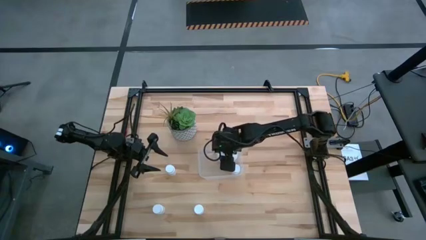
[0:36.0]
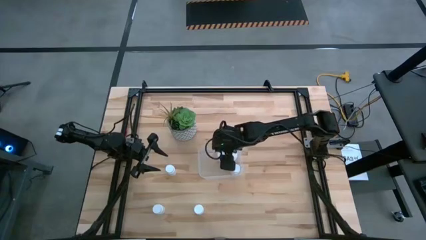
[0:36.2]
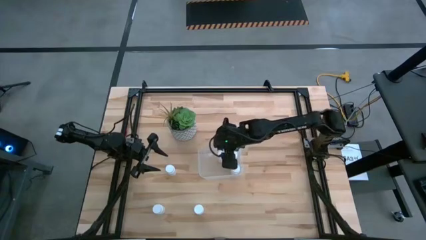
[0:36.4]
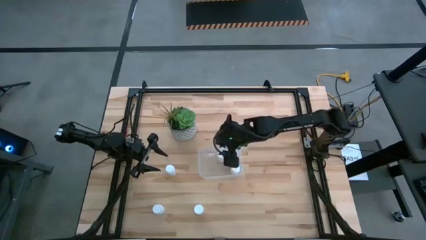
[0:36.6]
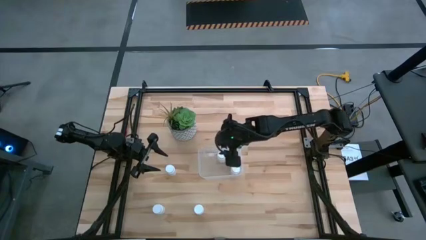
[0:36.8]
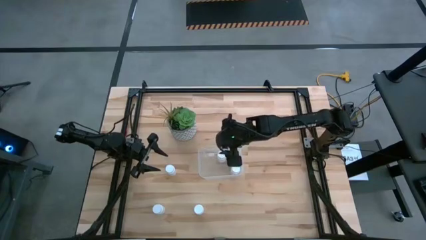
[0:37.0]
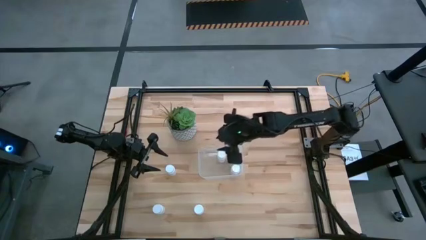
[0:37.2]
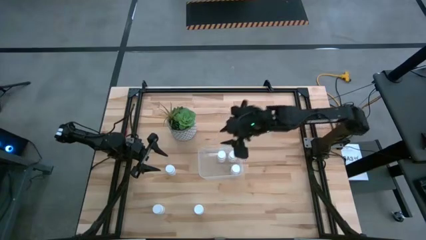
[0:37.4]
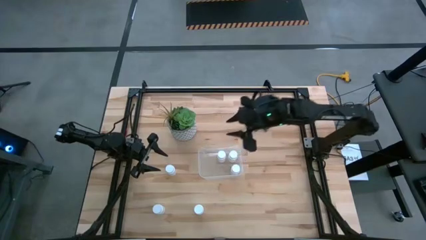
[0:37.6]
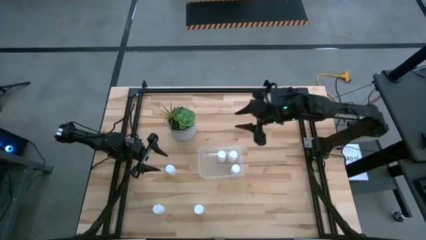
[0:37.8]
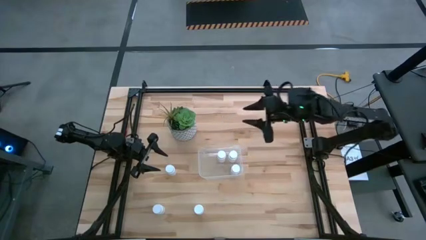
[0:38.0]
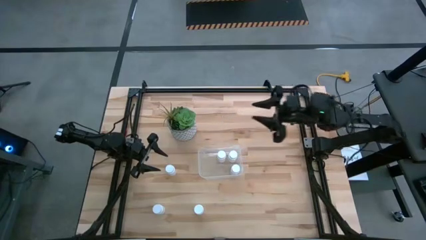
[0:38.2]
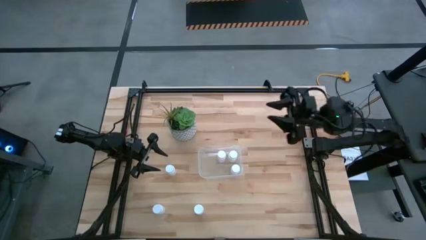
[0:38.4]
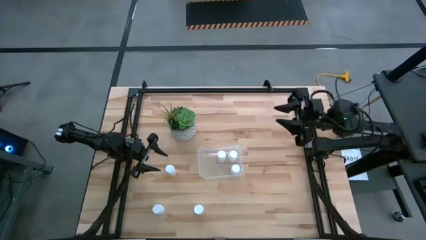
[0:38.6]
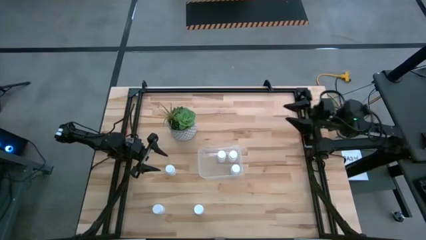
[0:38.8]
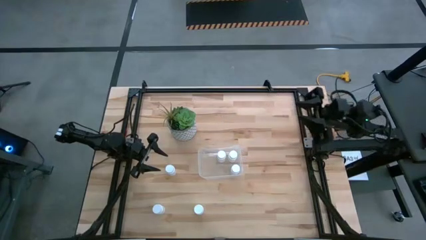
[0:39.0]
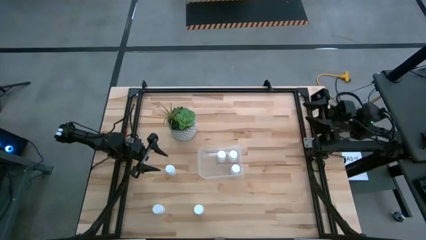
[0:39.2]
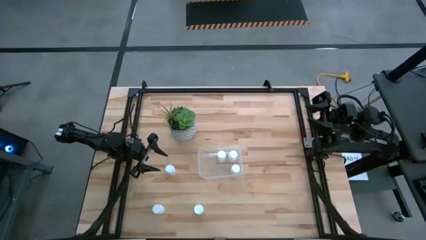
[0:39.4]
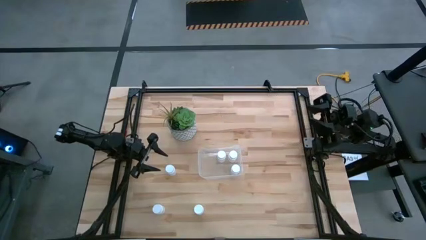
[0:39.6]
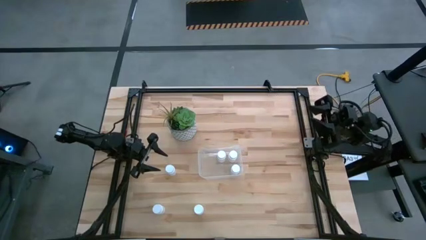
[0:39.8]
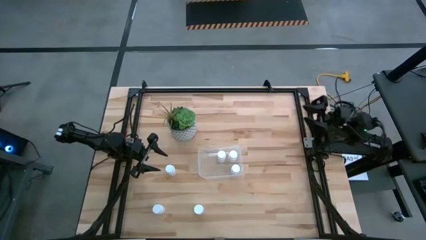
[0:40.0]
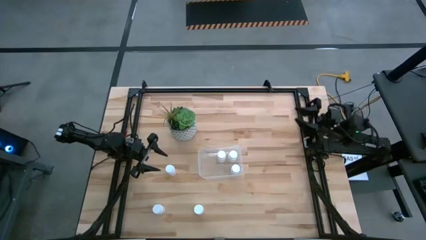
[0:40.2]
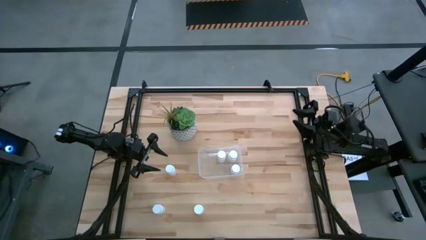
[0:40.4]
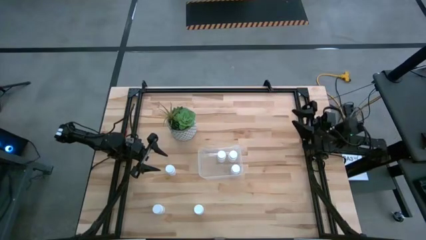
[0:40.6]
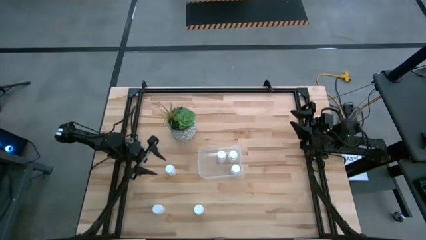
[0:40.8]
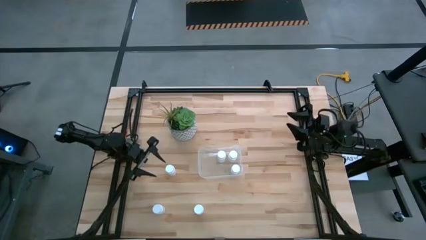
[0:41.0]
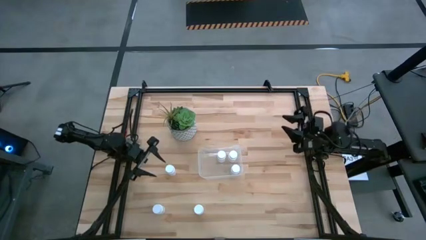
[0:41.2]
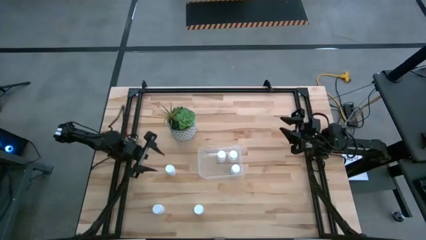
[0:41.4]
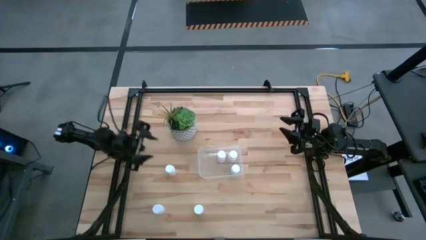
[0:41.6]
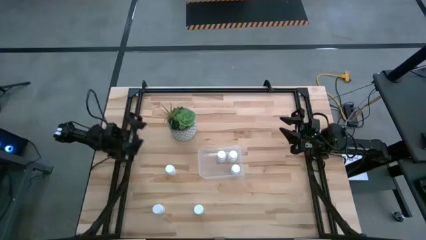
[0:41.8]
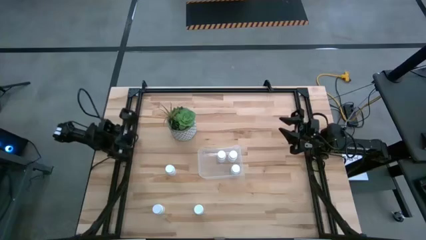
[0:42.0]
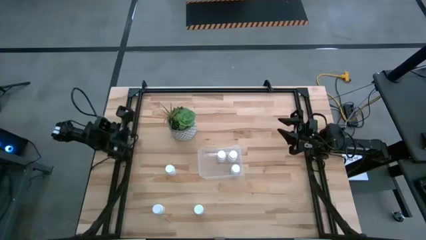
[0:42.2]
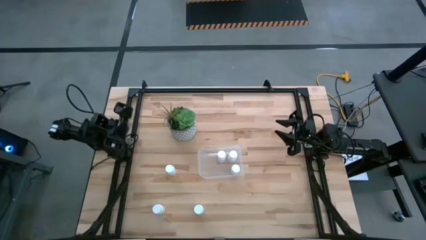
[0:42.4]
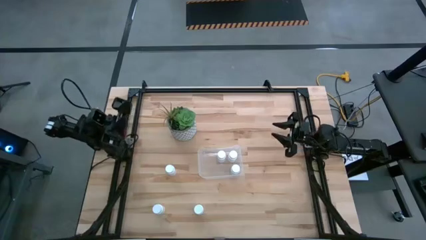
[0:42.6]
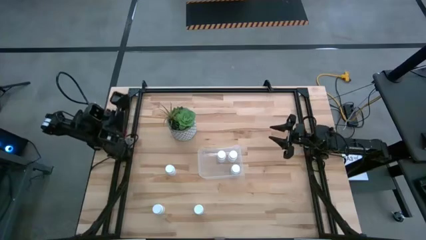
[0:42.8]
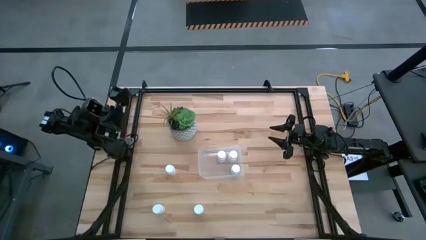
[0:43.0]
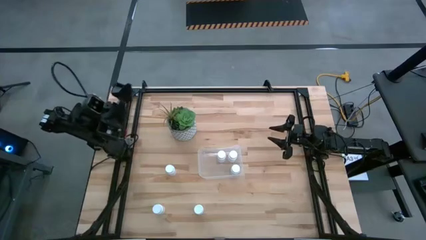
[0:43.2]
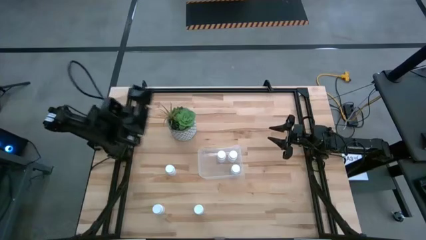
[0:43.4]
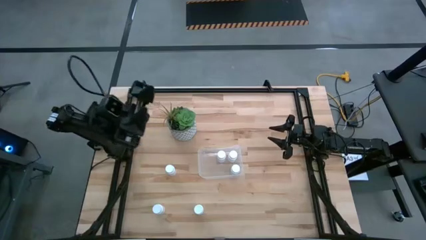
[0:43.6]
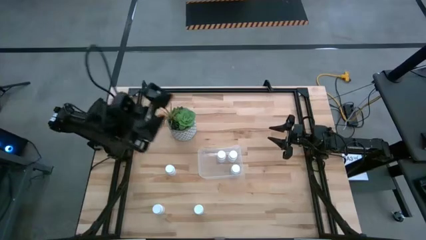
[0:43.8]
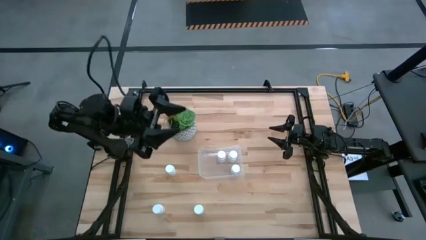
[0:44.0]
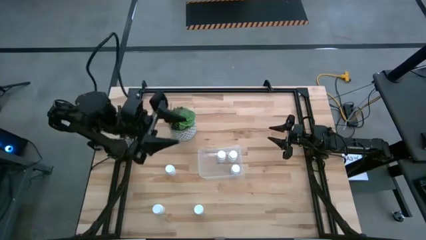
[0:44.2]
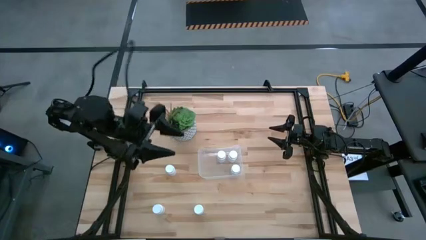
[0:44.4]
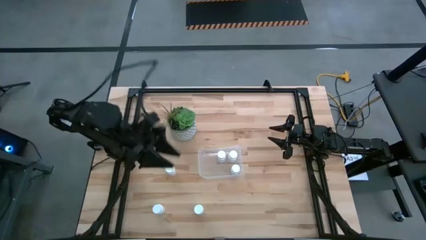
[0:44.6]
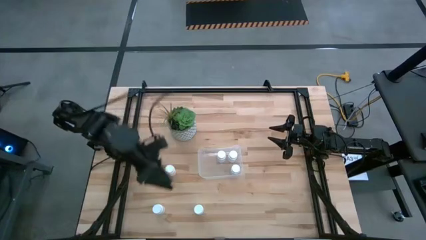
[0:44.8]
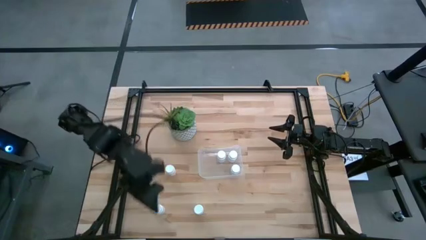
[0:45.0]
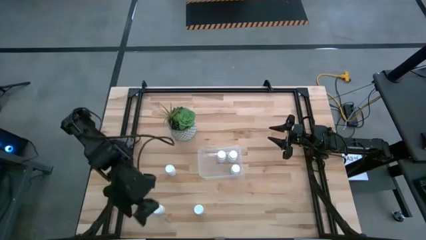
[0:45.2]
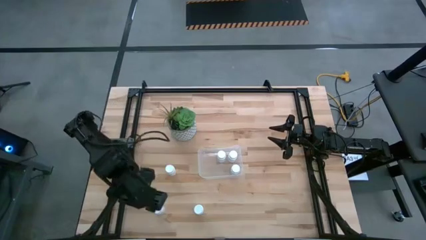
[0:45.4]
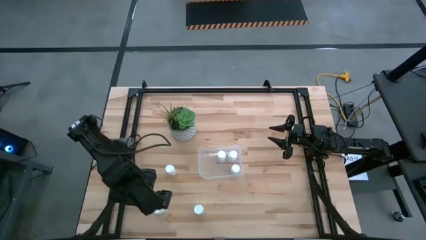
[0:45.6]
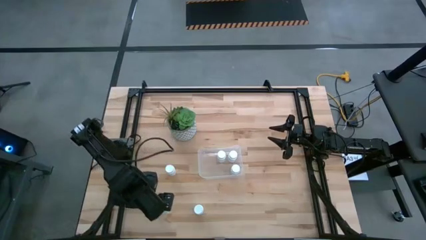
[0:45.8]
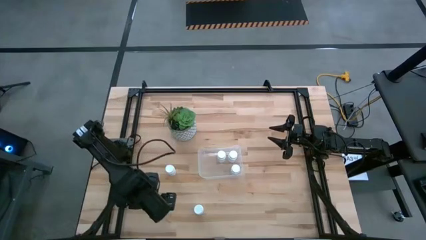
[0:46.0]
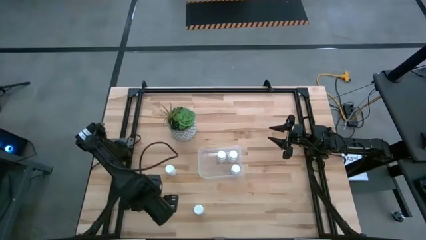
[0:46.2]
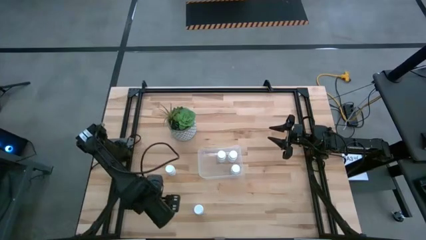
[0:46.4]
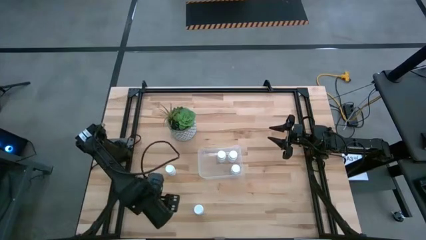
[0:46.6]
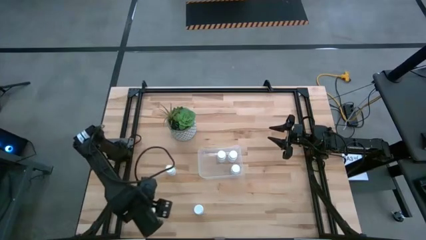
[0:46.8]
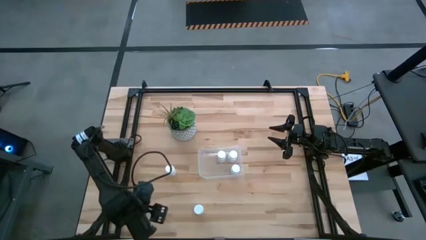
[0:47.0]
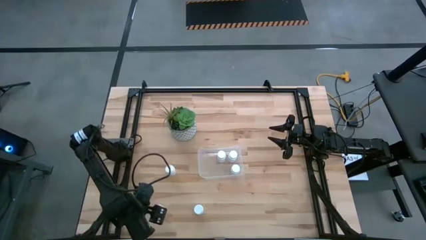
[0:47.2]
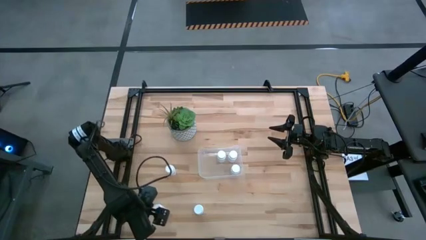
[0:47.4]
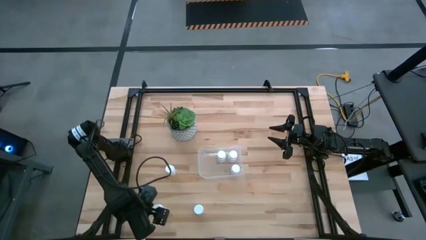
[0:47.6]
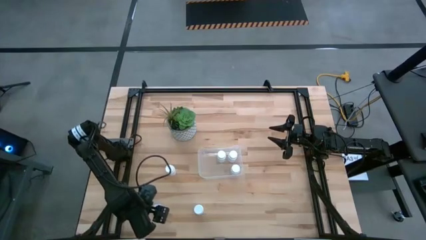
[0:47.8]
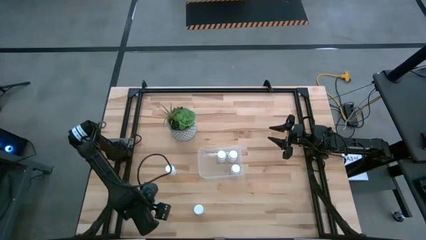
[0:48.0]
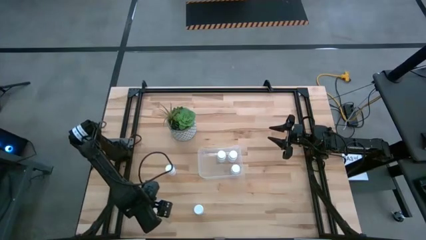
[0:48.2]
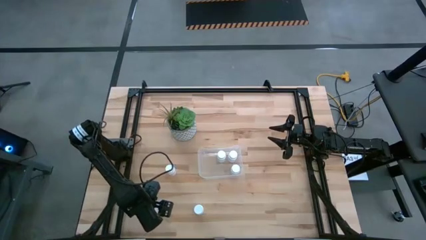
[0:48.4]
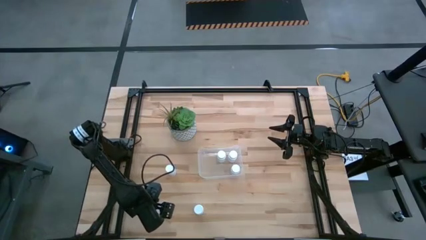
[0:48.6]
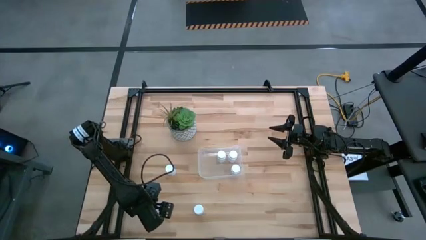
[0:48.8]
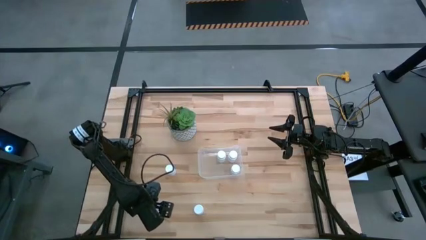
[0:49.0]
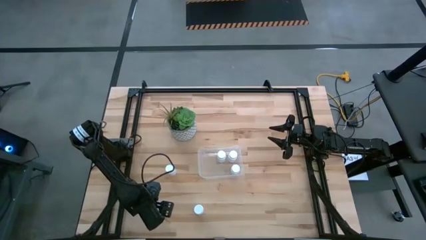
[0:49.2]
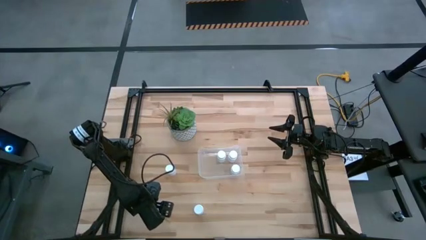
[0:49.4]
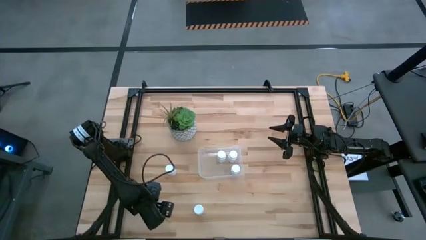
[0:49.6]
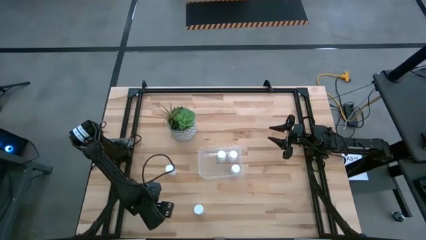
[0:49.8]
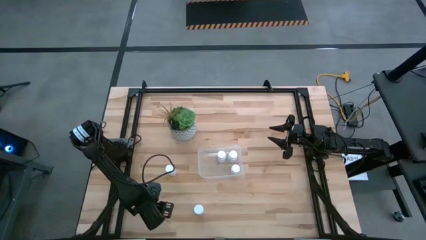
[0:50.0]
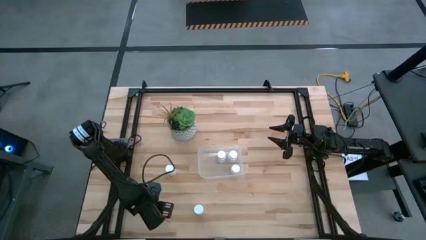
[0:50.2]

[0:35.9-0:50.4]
Task: Pick and place pill bottles into a basket
Put the white pill bottle into the transparent bin
